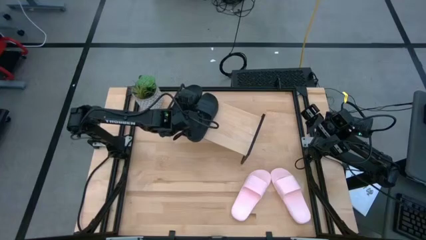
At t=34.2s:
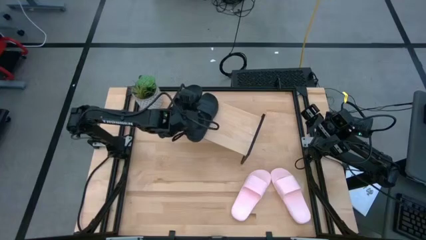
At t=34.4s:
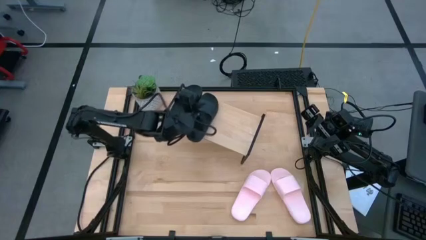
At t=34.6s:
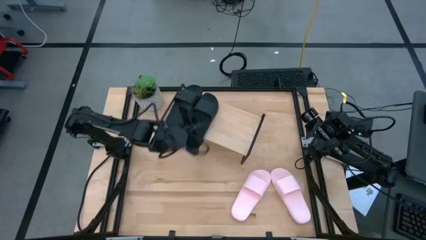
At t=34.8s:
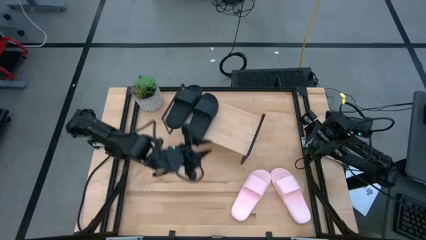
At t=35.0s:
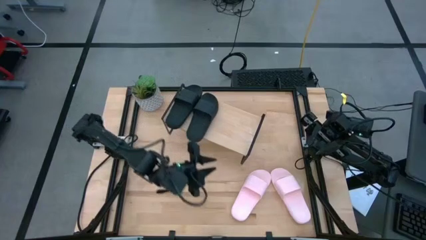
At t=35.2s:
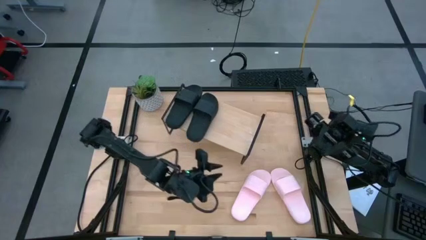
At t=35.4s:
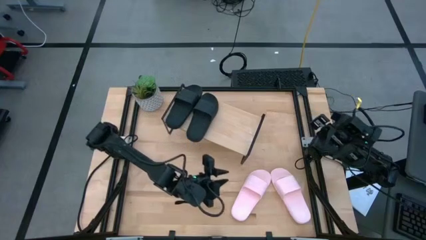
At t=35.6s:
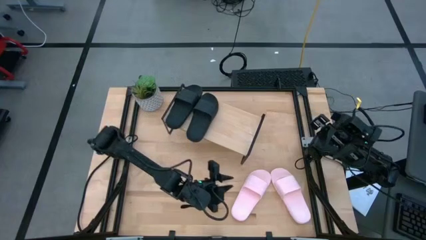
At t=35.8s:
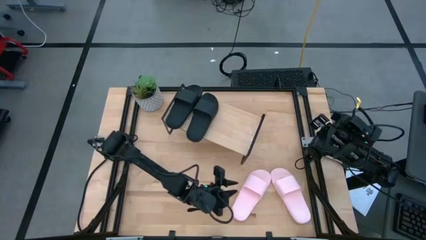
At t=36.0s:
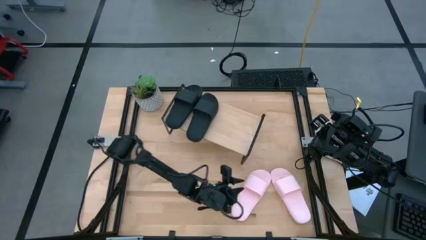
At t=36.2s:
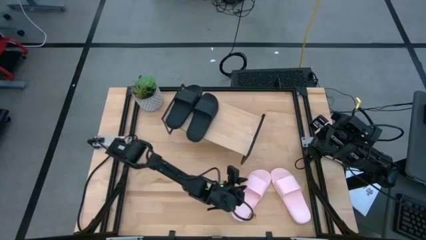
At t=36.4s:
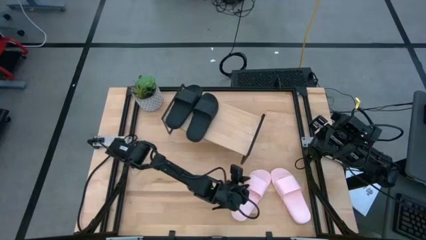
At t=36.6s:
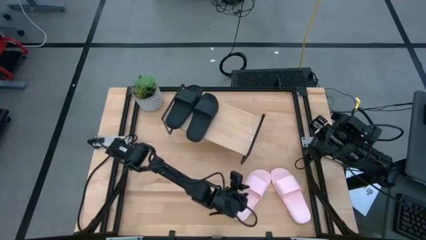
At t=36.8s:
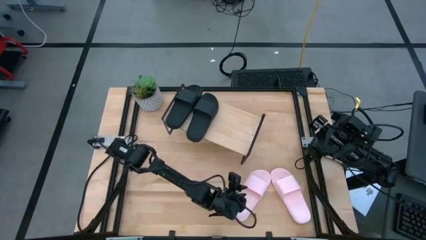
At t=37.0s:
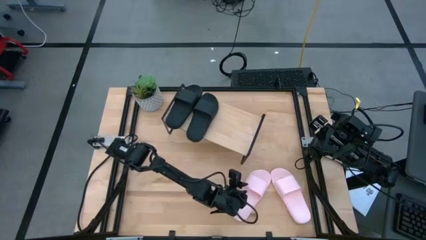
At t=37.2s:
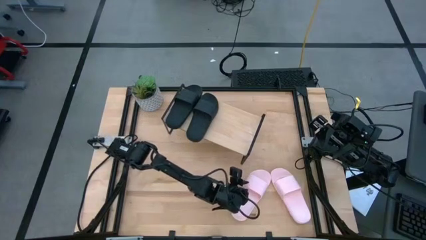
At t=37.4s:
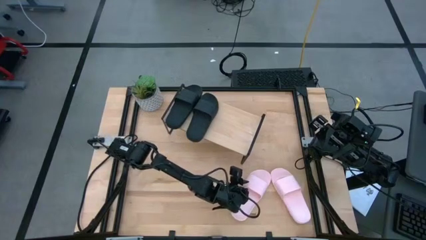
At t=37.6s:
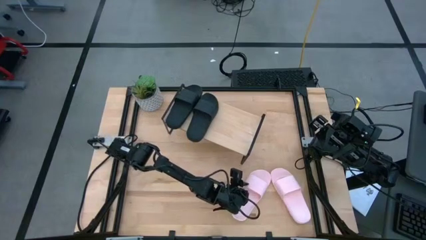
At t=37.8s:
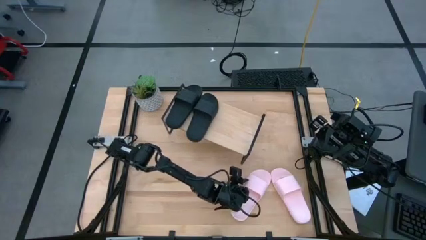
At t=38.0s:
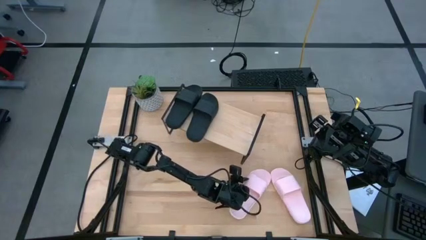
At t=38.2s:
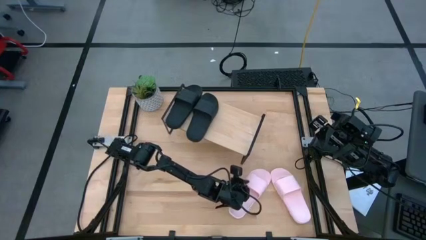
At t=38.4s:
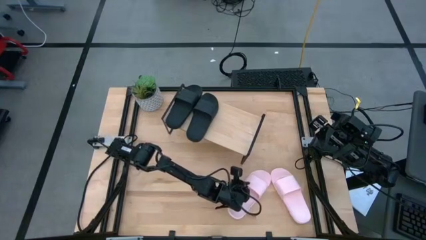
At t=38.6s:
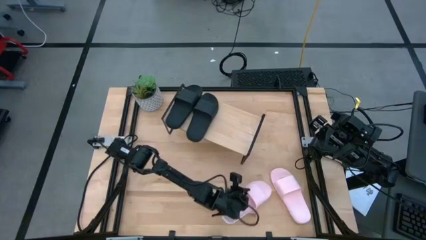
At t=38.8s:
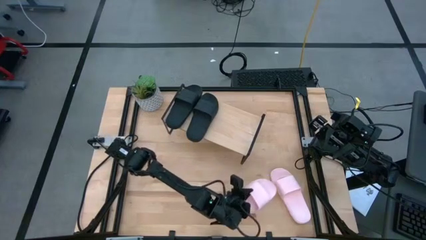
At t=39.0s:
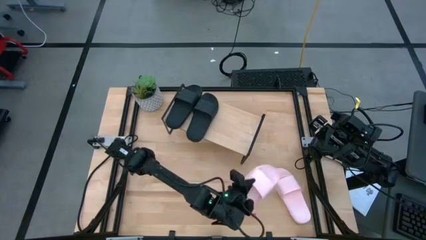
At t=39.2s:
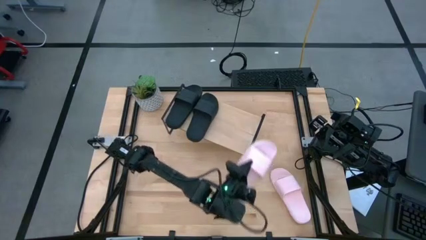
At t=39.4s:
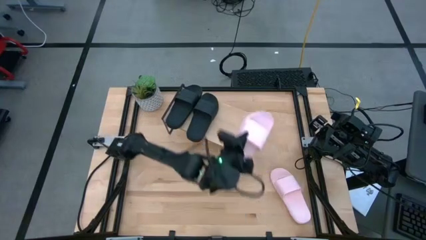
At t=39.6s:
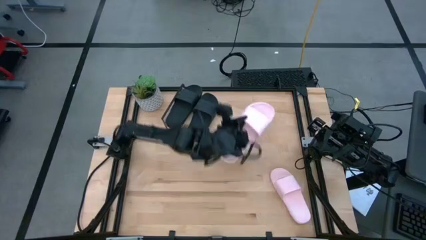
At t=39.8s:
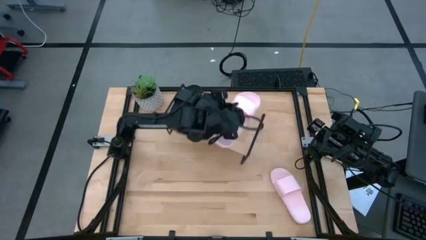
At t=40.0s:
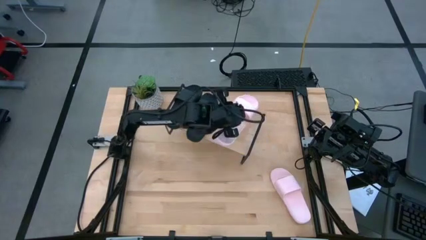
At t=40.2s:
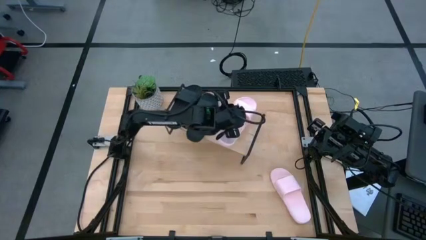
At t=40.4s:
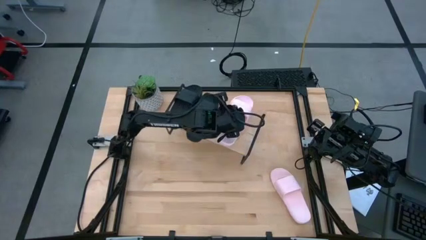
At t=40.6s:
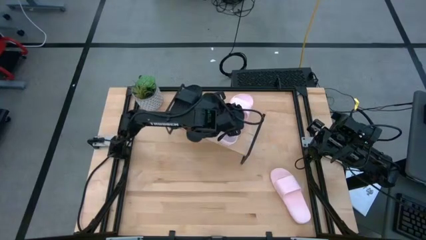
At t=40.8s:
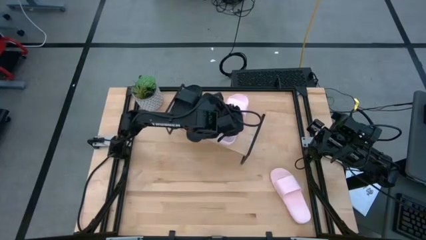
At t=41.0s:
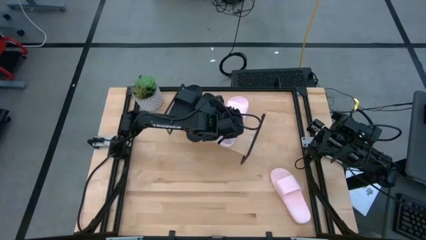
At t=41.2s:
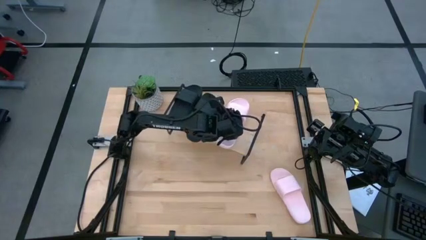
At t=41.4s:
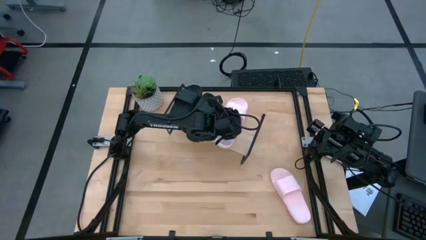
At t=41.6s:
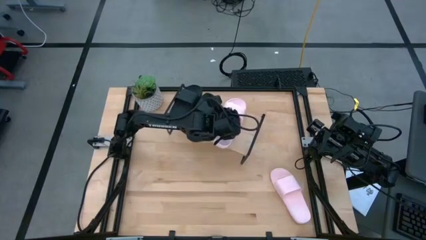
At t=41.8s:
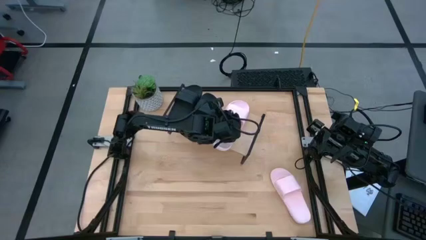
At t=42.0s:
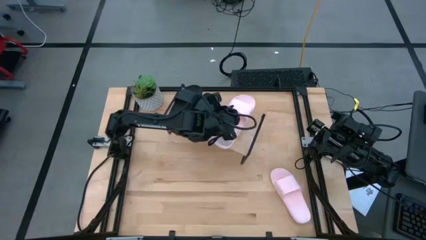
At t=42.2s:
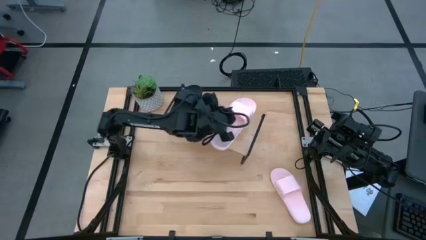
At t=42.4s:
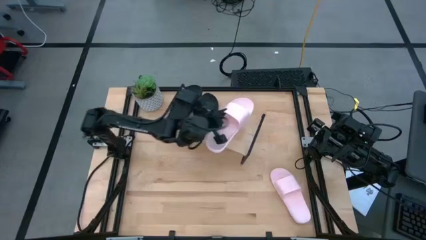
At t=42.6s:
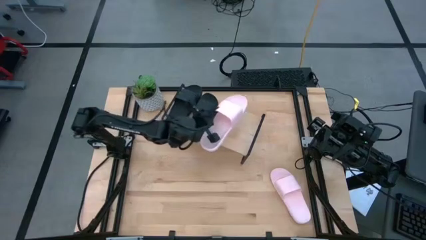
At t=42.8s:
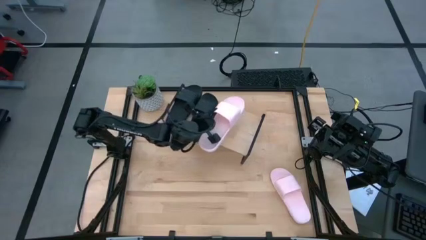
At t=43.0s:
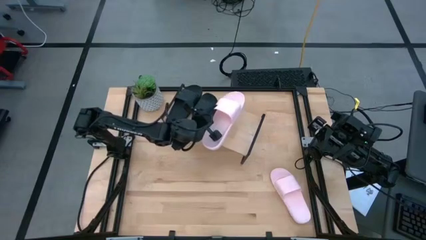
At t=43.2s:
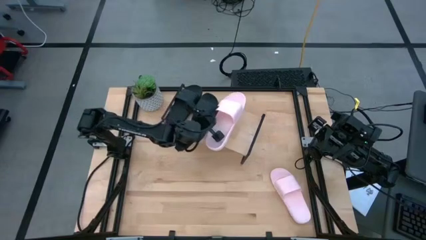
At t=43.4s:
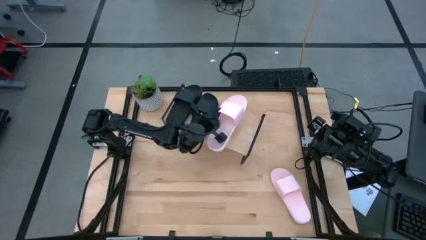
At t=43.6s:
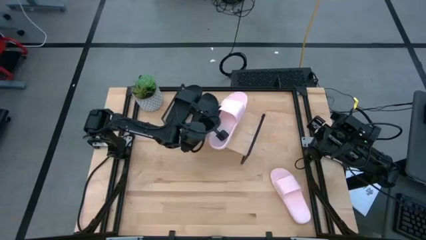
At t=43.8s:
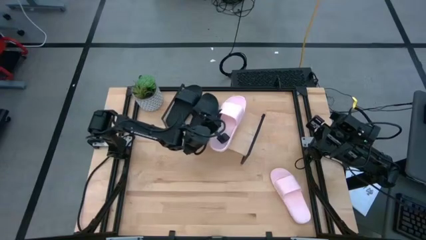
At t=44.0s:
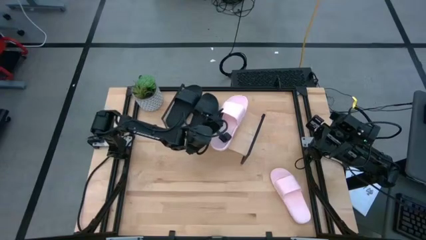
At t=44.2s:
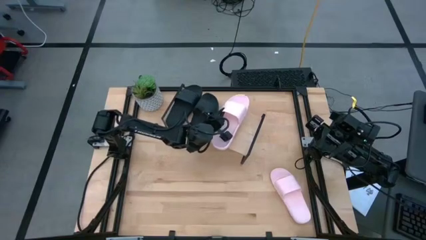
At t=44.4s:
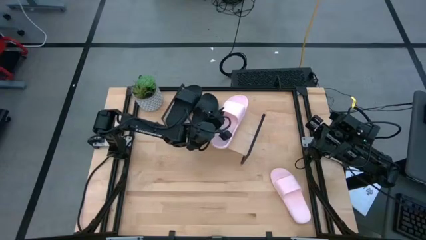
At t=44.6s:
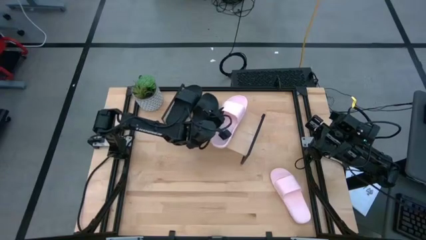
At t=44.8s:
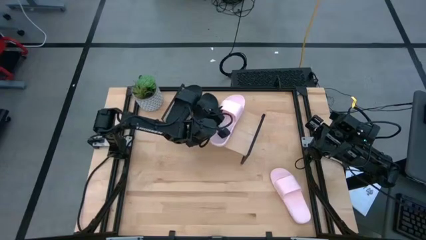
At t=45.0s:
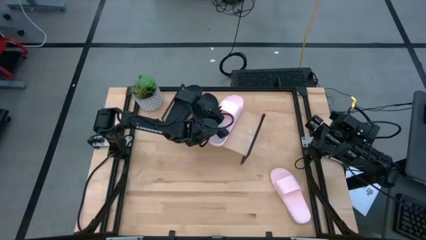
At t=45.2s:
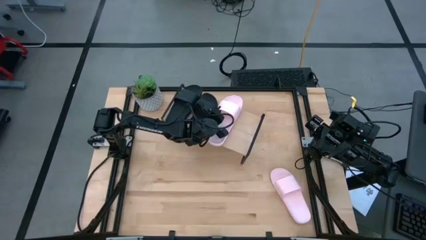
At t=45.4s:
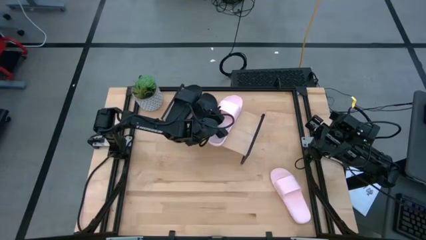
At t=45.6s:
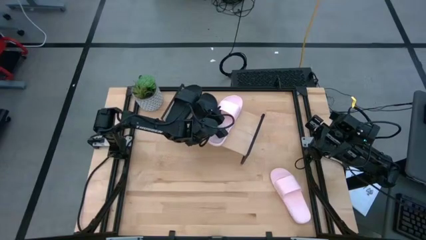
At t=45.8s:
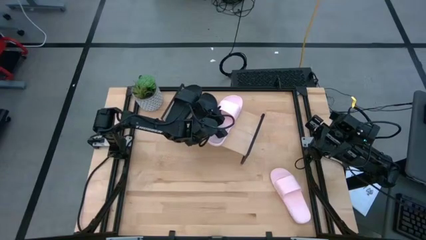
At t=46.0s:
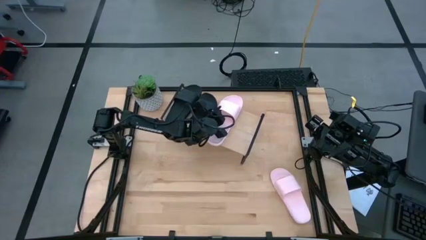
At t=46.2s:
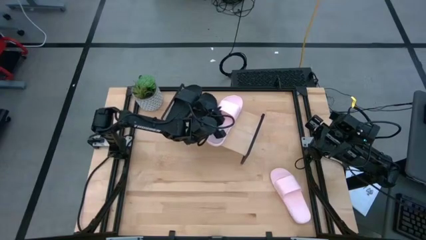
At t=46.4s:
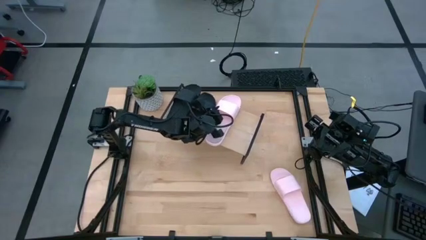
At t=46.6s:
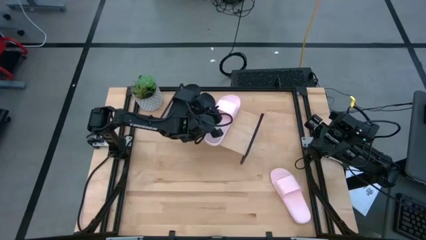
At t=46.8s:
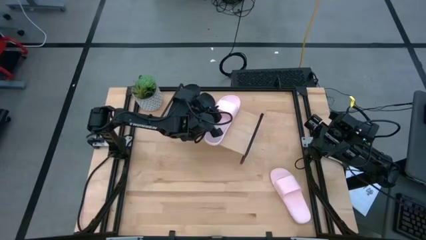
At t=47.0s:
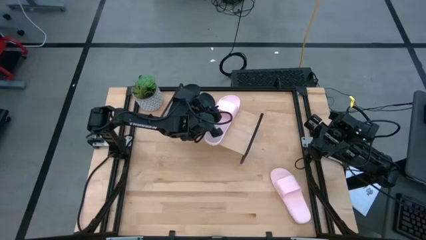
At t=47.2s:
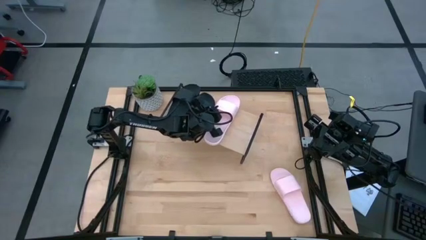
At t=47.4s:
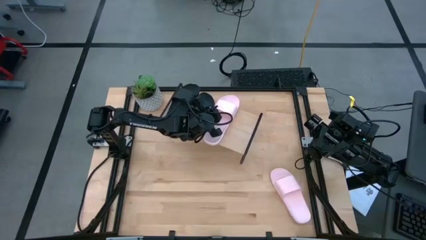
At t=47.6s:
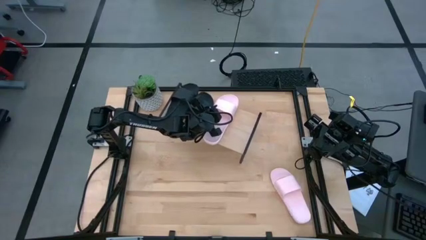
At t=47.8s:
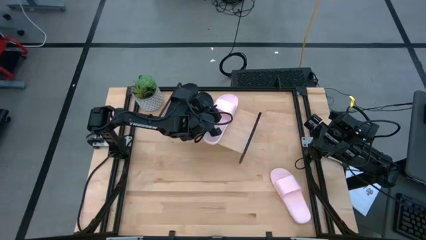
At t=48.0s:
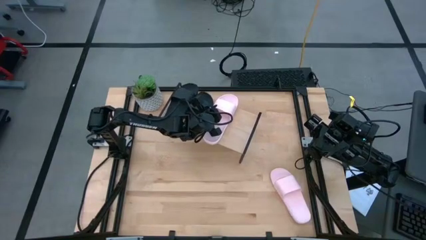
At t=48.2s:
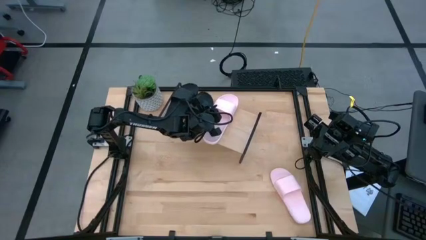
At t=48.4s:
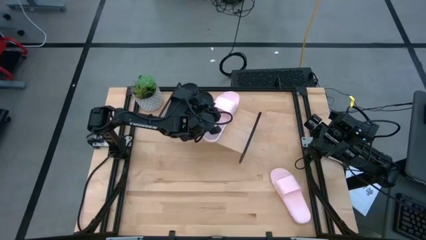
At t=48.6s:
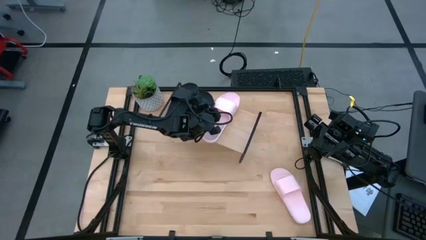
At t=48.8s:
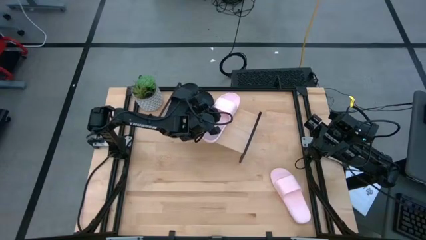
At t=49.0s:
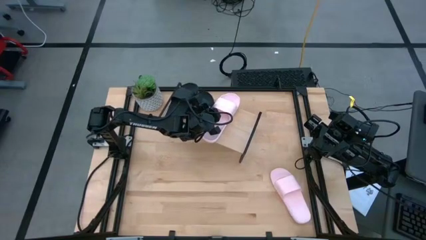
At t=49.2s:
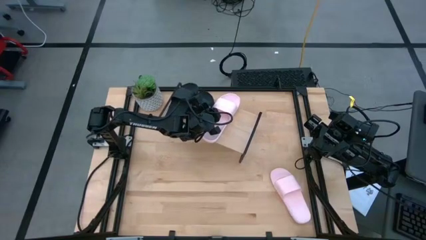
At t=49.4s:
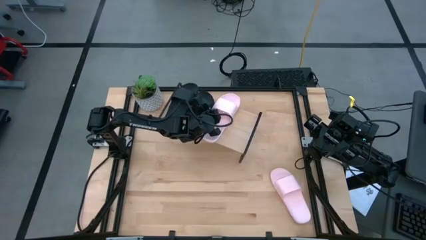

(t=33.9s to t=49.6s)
Task: Pick and place slides into the shelf
Put the left pink slide on the shelf
